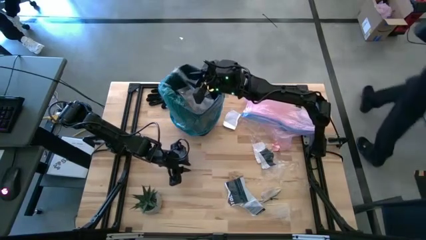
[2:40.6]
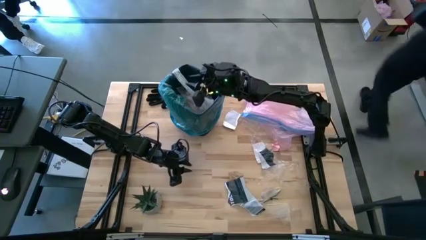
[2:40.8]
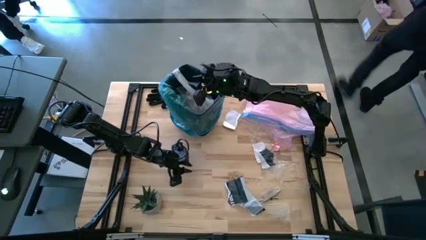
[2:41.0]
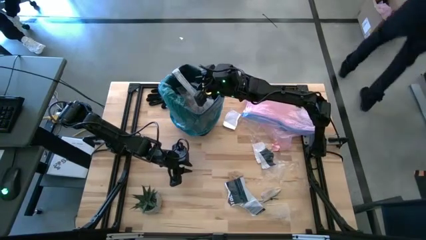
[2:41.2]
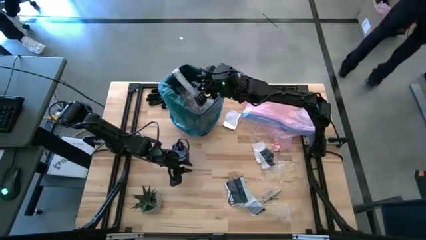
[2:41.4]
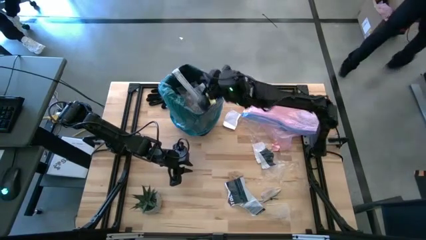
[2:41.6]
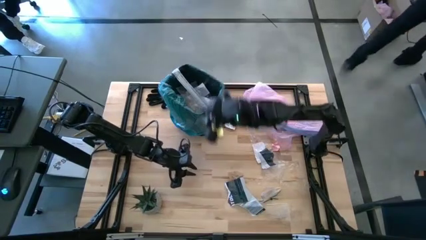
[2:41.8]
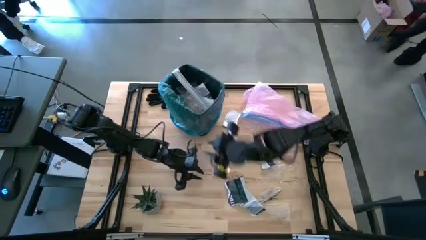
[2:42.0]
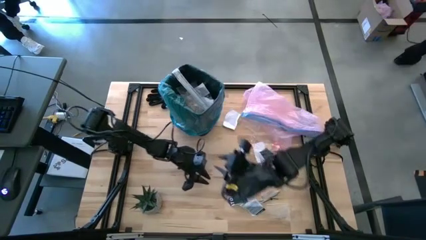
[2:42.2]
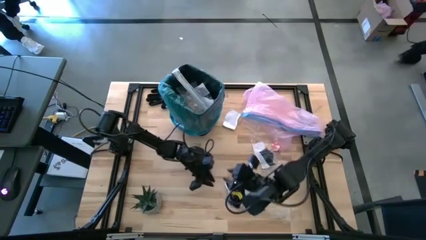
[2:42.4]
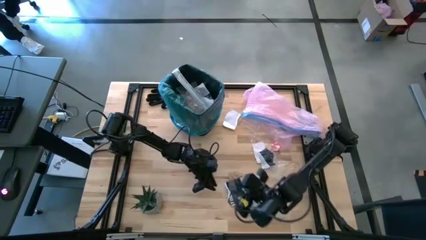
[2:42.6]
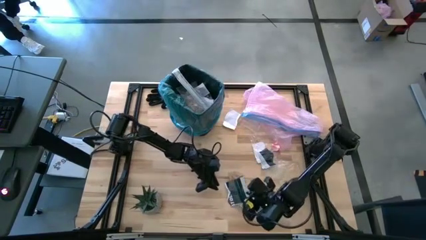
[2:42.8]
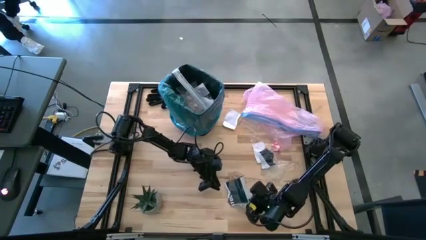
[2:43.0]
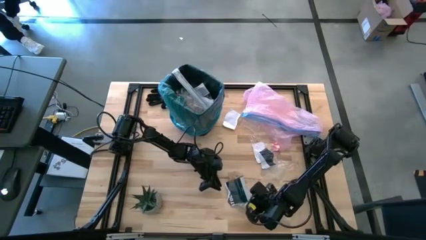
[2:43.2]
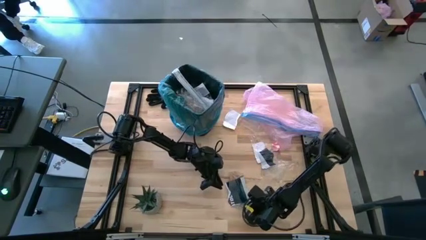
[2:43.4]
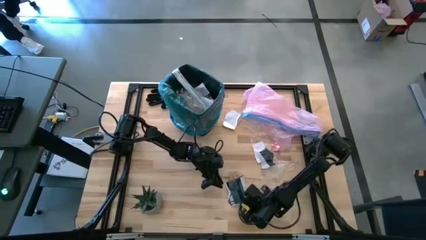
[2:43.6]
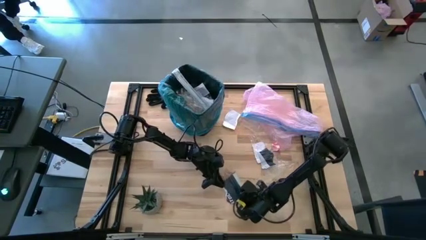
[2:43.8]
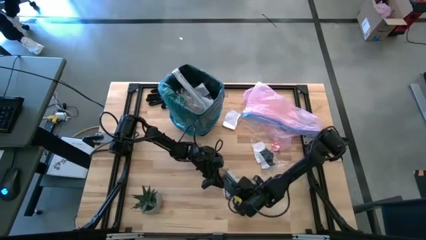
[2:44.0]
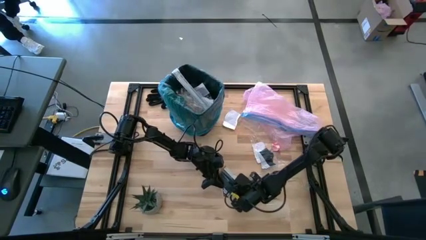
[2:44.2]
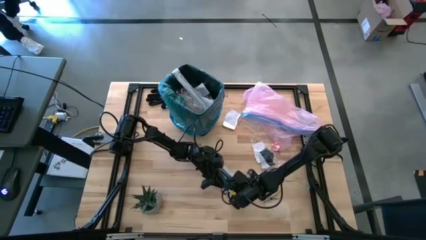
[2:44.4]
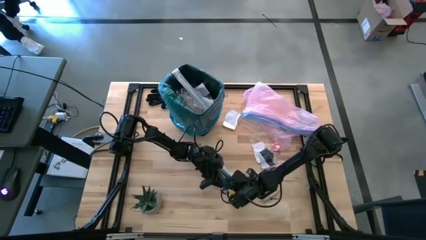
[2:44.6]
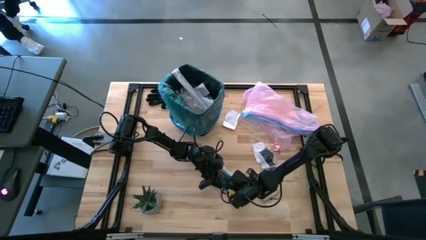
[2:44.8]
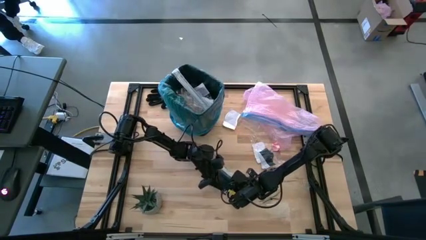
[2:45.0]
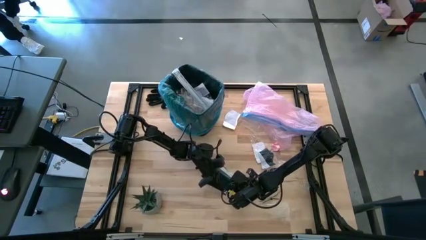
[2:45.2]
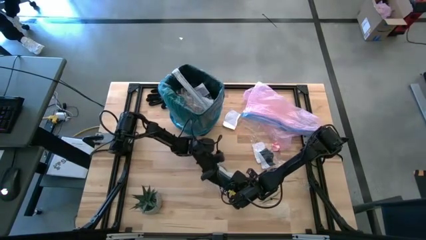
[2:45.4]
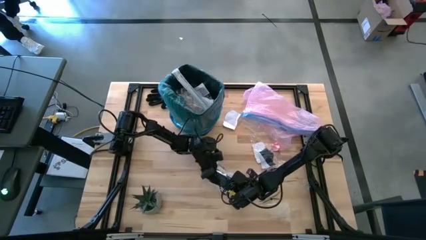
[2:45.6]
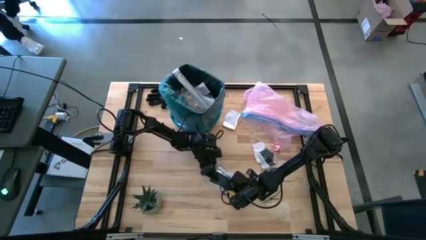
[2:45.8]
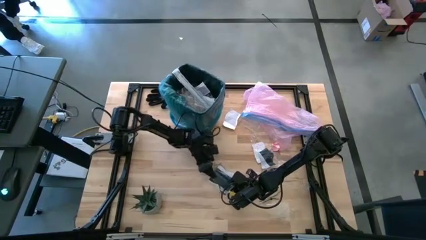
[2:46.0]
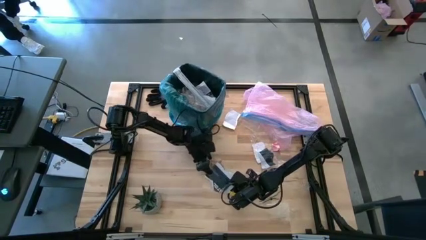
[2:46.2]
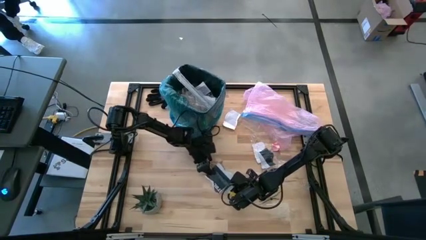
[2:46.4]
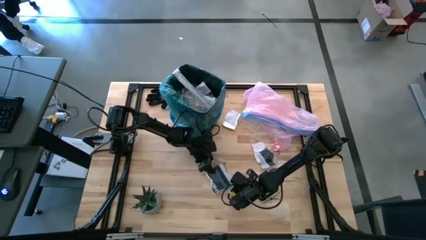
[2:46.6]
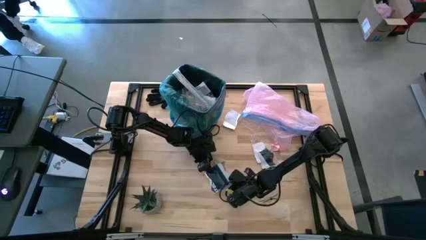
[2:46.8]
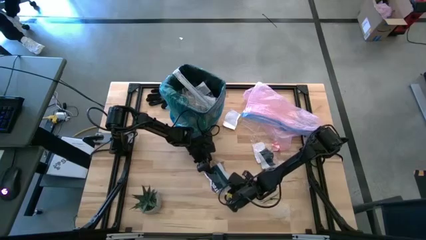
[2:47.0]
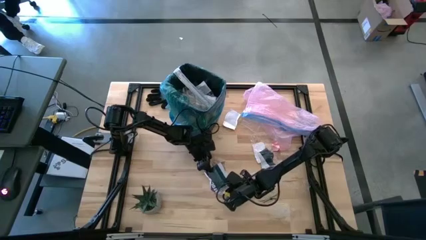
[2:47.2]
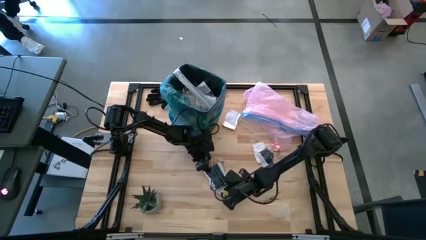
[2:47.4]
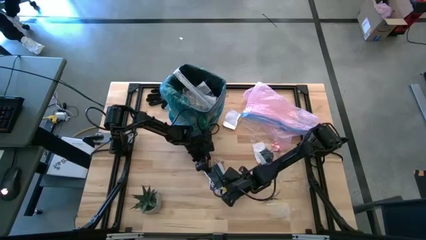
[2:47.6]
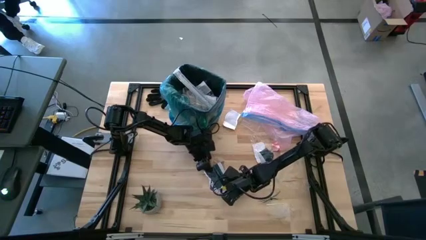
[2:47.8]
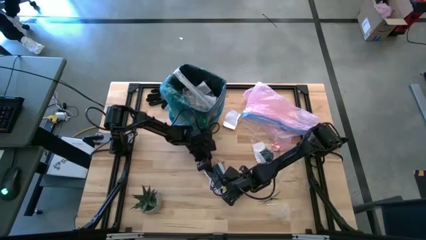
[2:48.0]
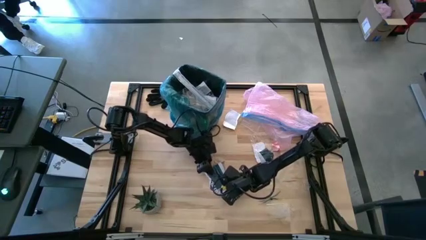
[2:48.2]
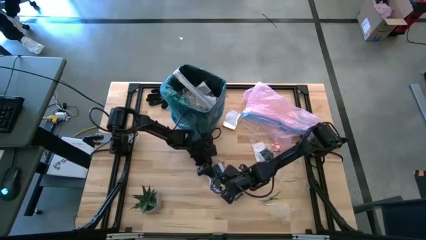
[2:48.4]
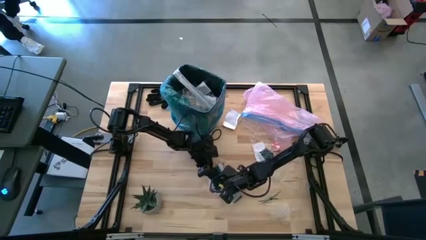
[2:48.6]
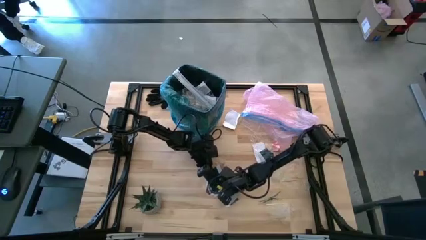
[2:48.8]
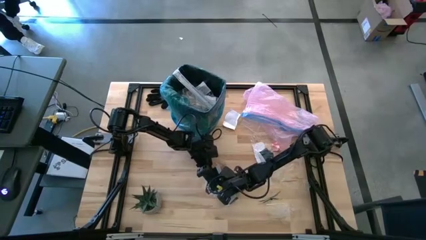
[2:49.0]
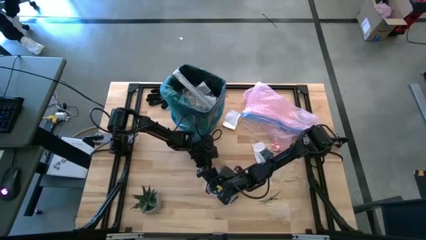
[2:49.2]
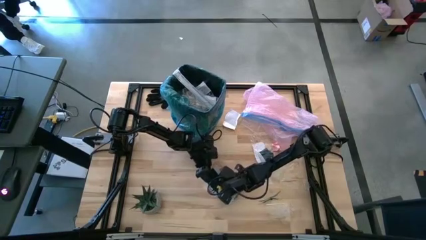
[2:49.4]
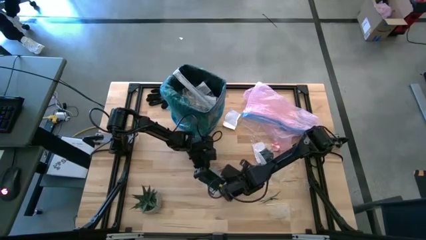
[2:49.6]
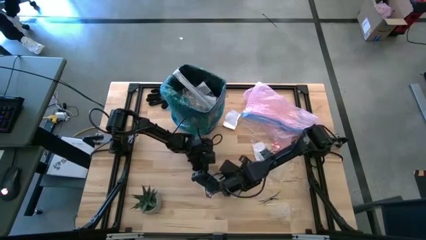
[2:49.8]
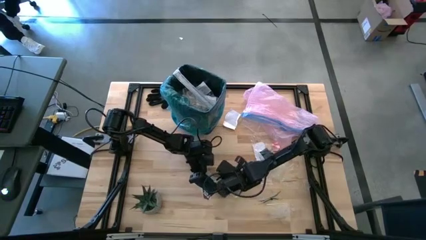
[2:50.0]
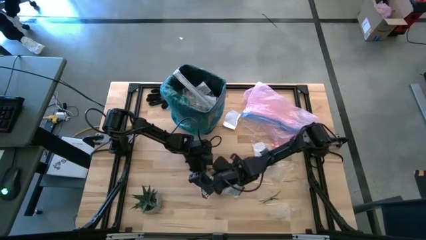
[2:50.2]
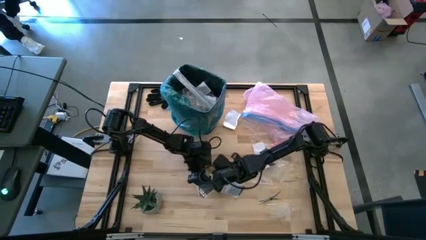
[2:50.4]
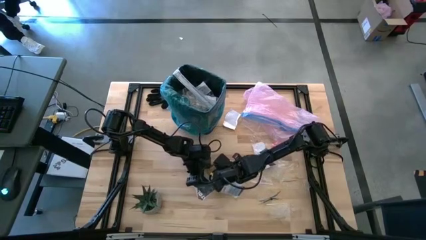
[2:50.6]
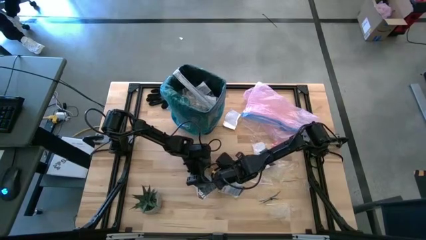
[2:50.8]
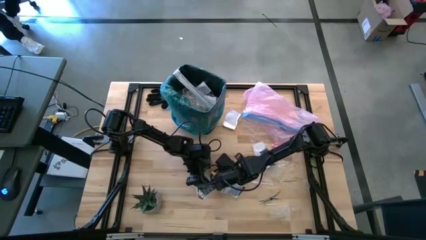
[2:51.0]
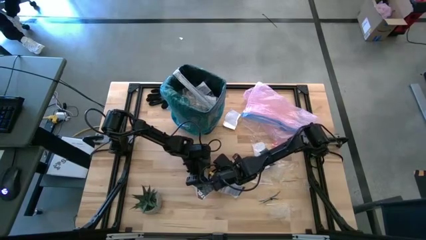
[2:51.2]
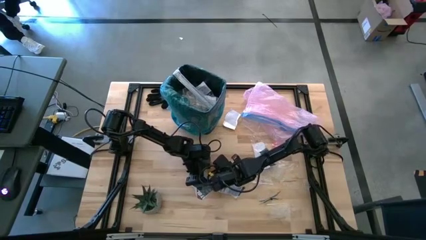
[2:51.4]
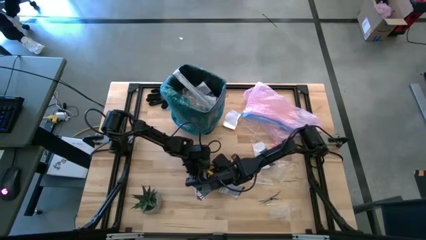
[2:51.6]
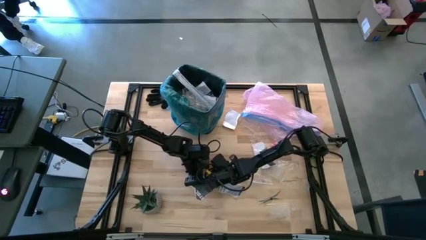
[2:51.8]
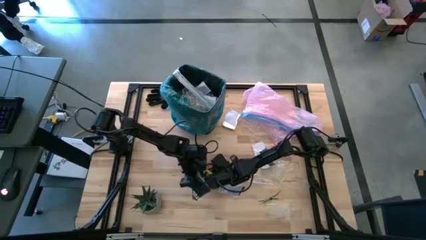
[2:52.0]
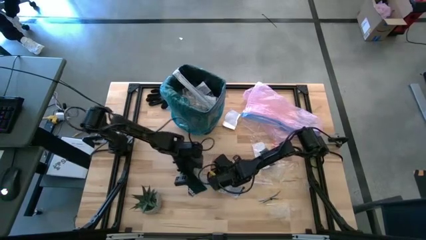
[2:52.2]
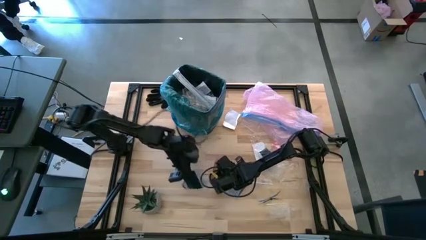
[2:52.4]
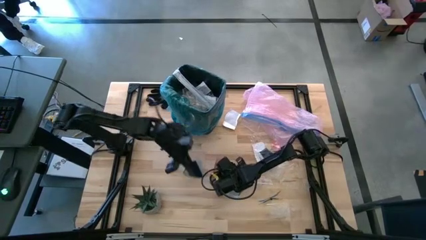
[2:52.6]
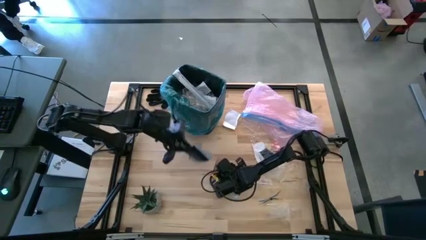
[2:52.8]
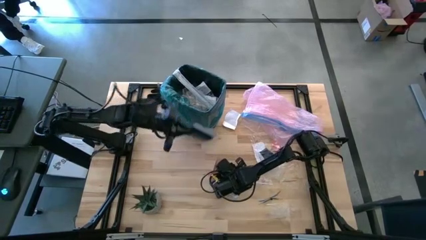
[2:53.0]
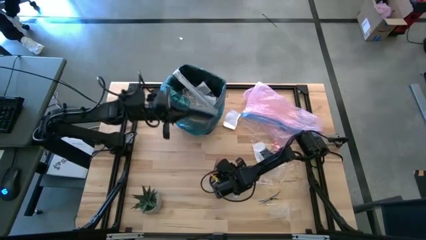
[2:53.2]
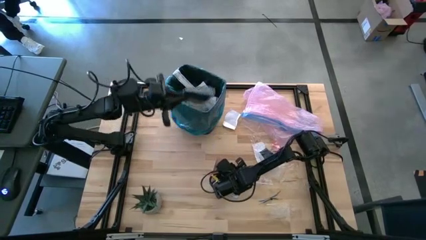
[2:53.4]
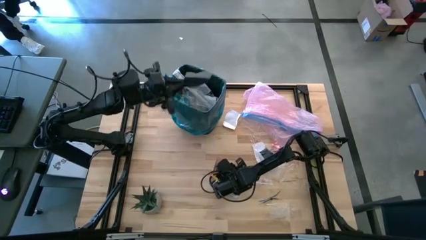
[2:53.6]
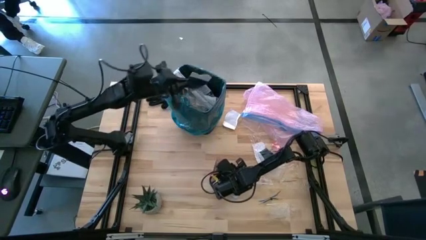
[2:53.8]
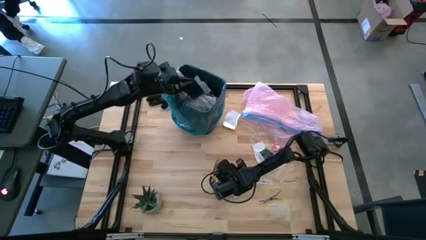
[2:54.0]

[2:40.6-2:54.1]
Task: place trash/remove bag and relplace
Put the printed paper into the trash bin

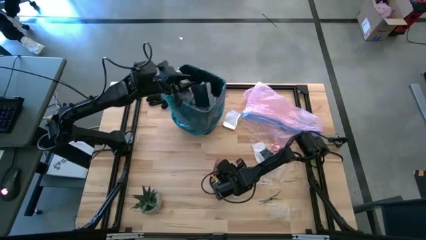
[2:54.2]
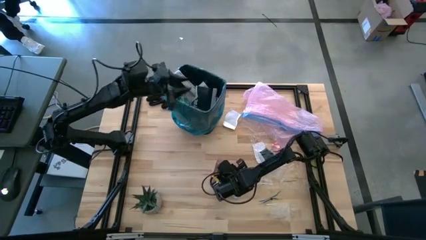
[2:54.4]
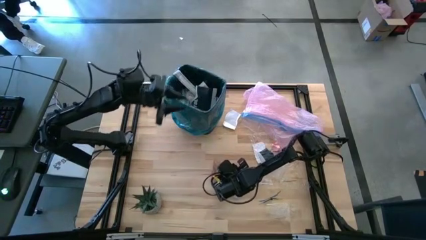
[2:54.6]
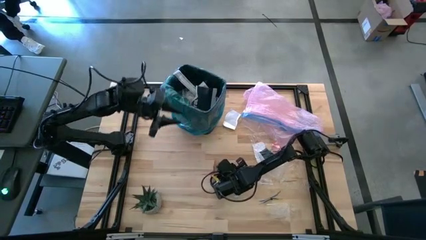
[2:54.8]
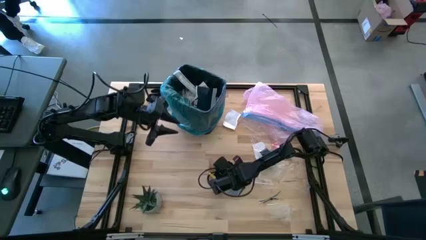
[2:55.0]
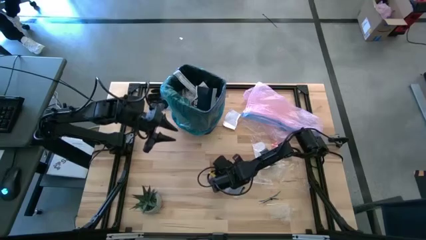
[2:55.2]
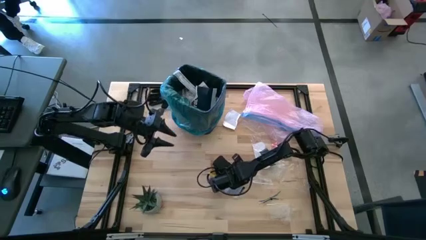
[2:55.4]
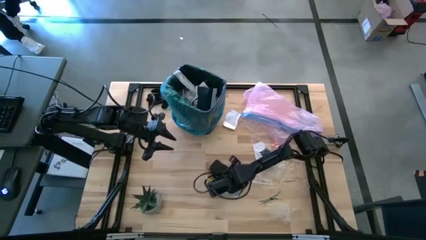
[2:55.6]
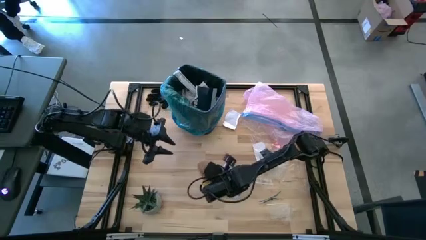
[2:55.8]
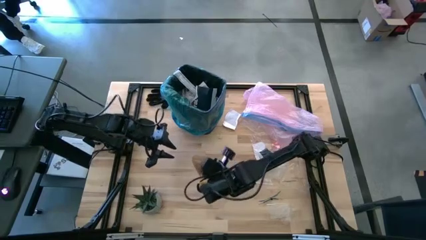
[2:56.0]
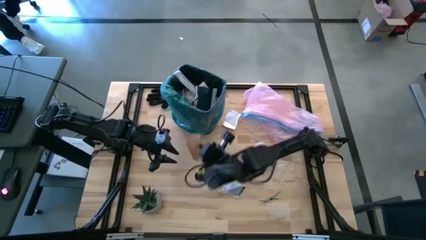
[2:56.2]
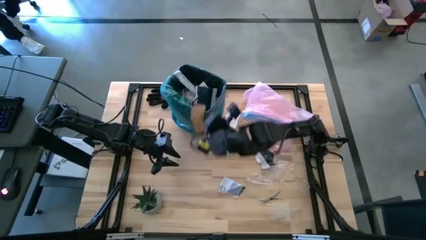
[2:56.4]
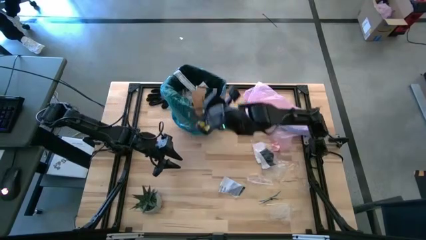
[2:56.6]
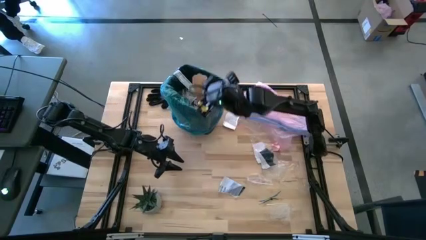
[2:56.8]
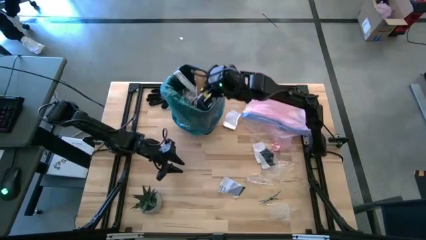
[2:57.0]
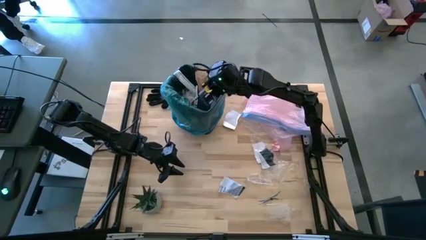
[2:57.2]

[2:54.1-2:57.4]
Put the brown napkin into the trash bin
